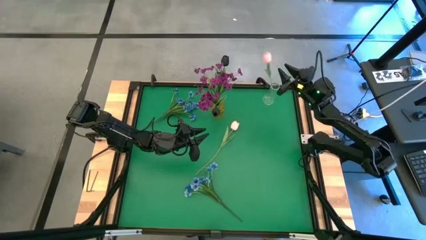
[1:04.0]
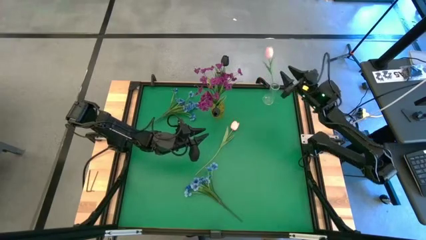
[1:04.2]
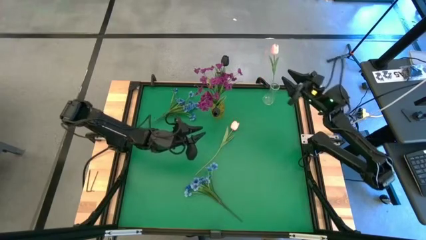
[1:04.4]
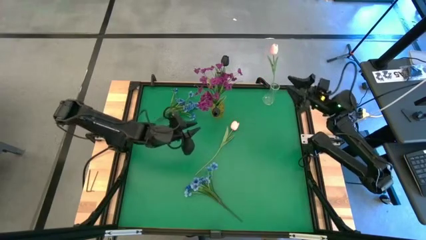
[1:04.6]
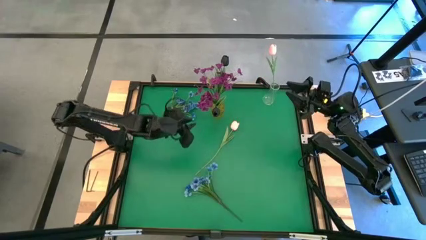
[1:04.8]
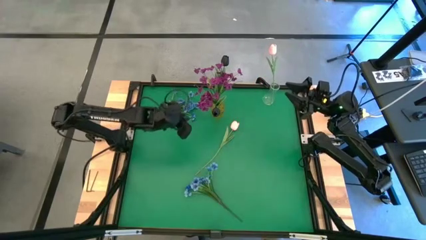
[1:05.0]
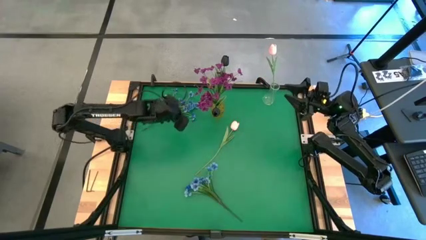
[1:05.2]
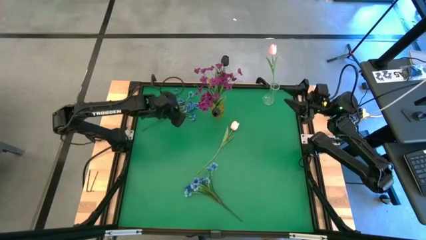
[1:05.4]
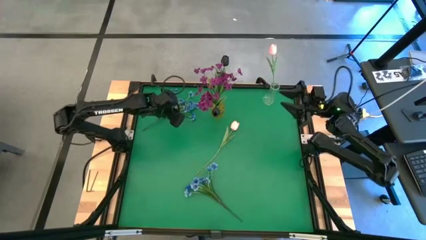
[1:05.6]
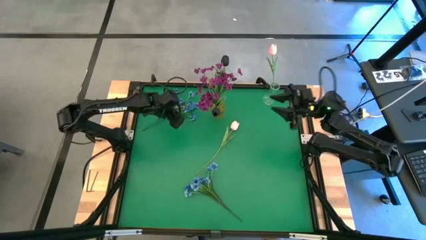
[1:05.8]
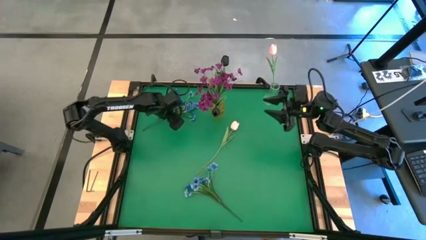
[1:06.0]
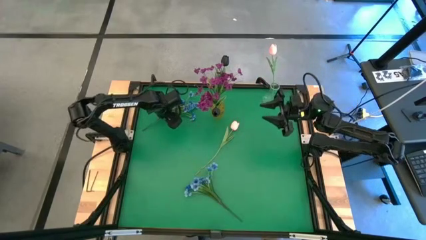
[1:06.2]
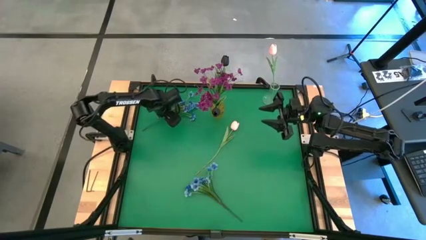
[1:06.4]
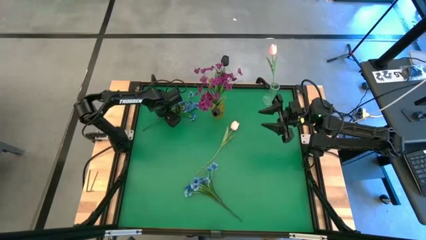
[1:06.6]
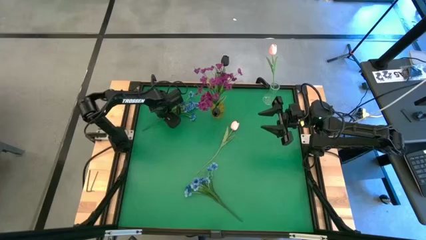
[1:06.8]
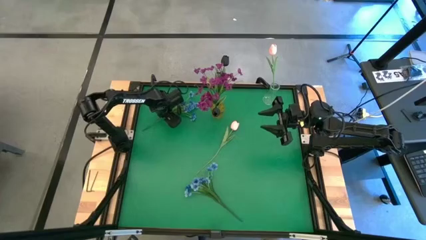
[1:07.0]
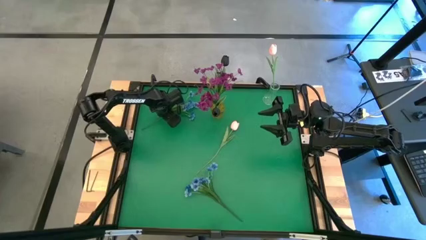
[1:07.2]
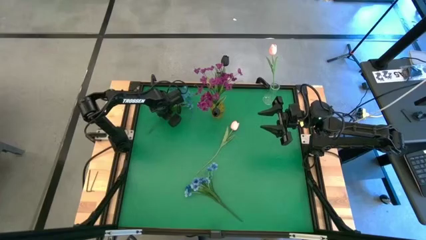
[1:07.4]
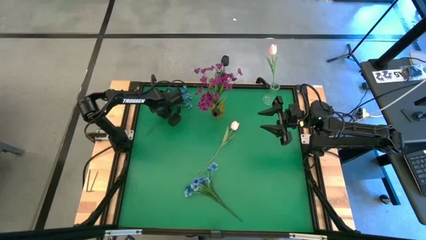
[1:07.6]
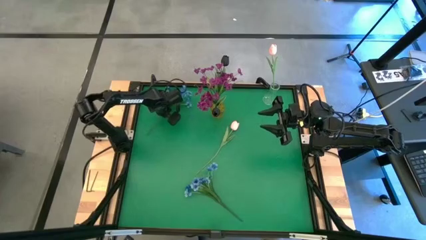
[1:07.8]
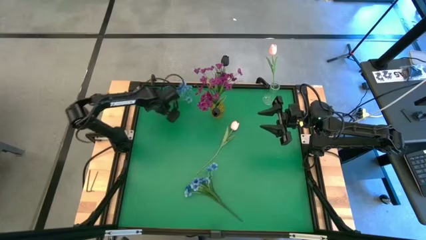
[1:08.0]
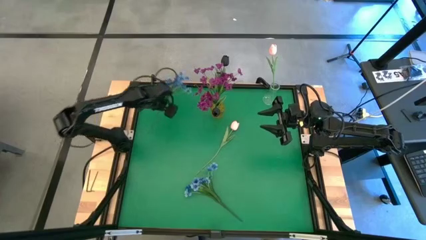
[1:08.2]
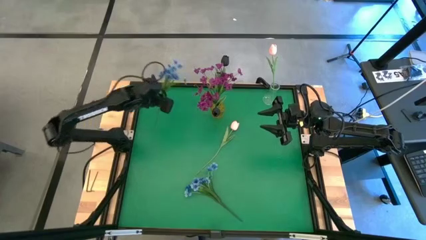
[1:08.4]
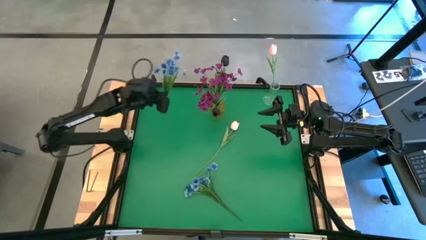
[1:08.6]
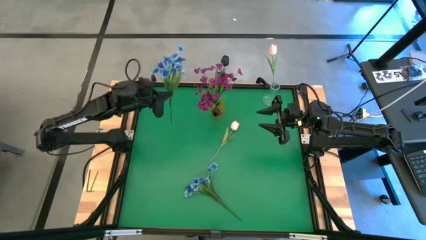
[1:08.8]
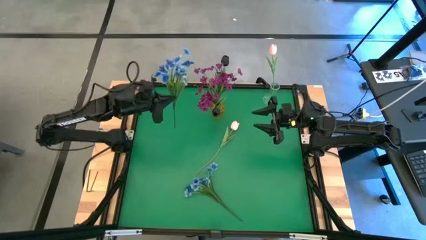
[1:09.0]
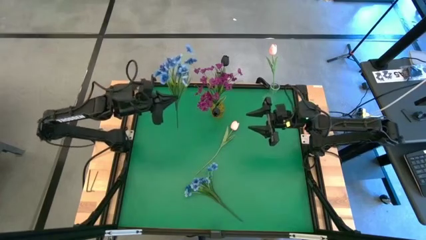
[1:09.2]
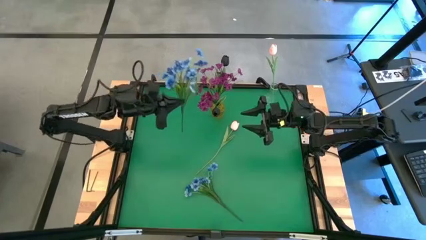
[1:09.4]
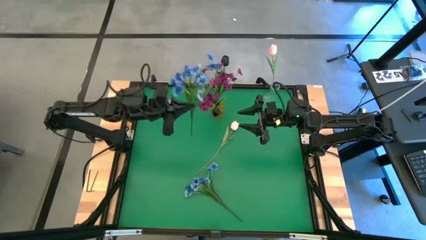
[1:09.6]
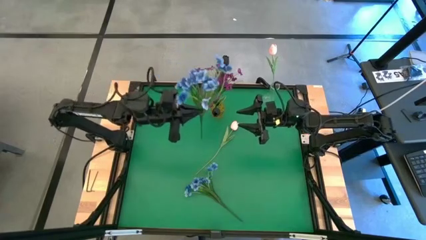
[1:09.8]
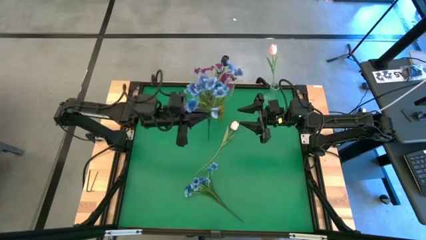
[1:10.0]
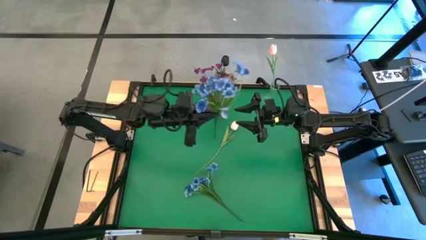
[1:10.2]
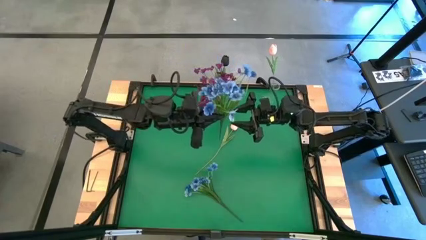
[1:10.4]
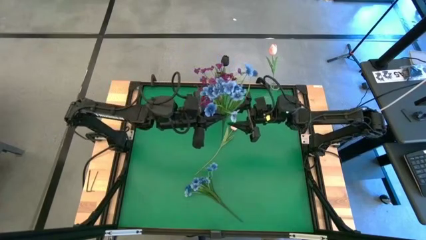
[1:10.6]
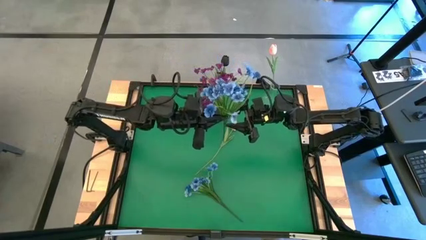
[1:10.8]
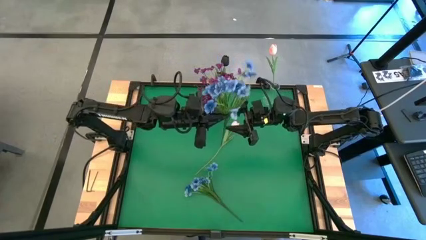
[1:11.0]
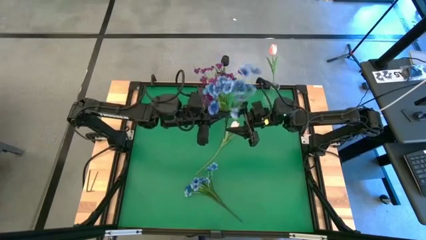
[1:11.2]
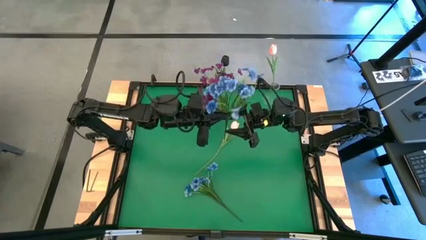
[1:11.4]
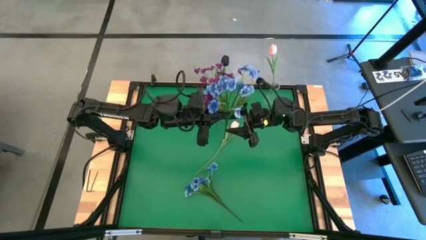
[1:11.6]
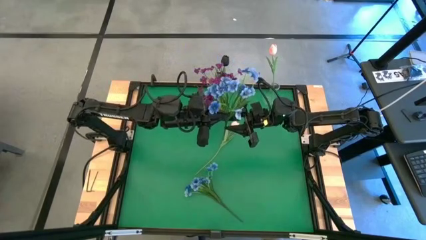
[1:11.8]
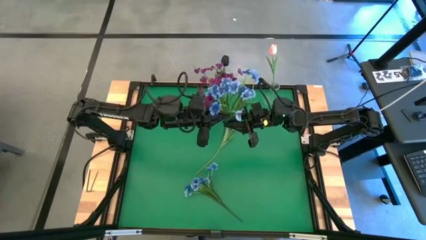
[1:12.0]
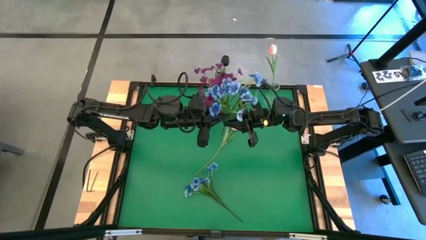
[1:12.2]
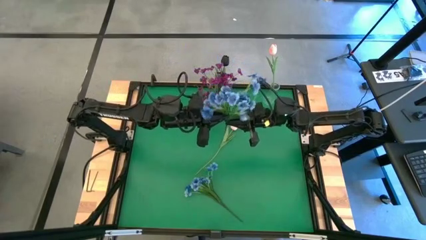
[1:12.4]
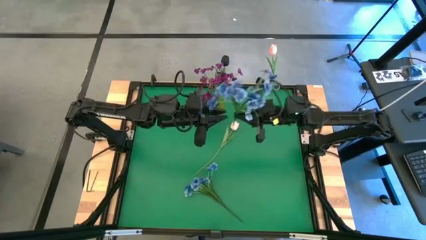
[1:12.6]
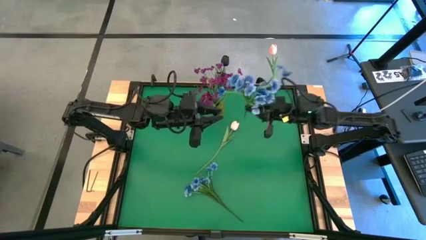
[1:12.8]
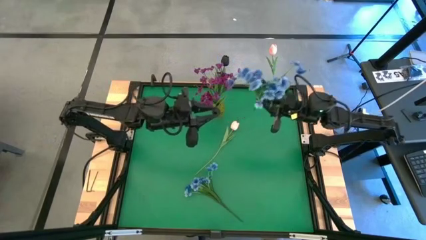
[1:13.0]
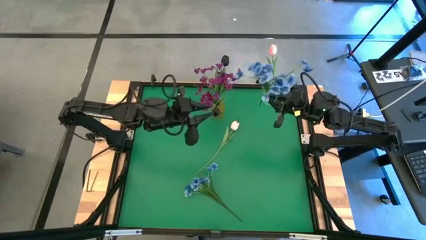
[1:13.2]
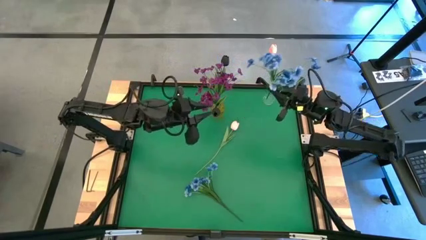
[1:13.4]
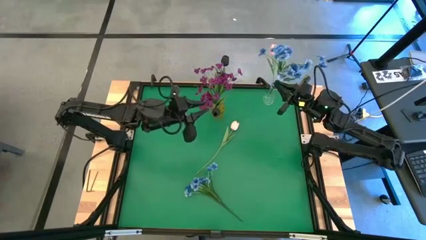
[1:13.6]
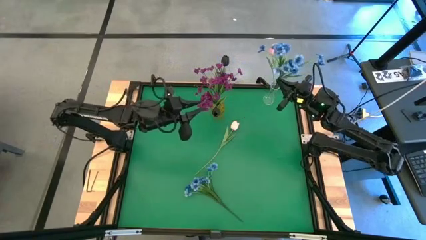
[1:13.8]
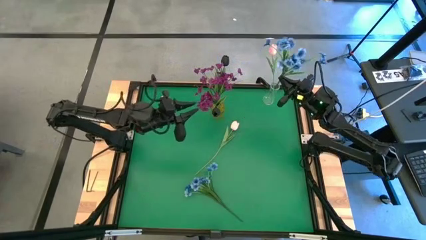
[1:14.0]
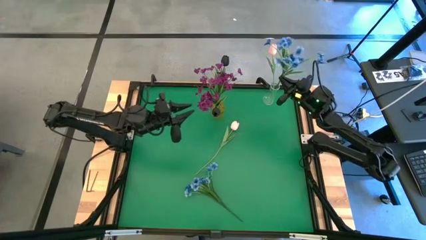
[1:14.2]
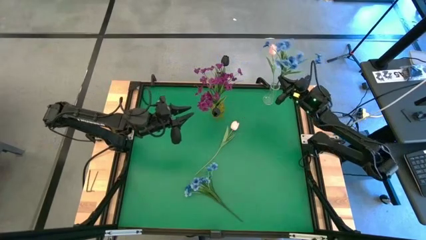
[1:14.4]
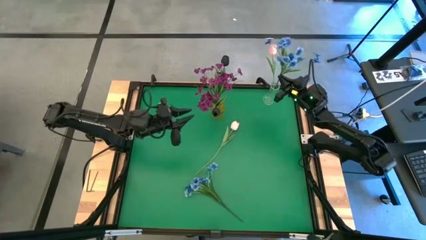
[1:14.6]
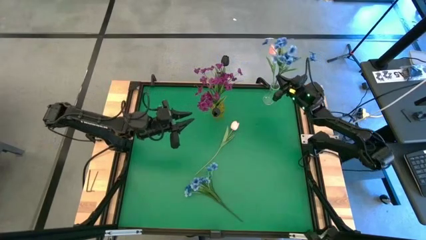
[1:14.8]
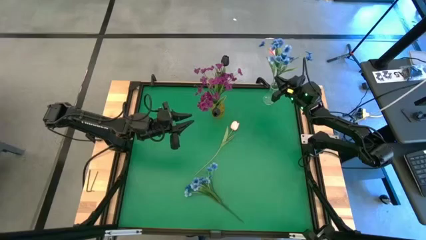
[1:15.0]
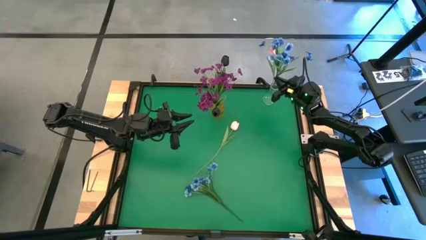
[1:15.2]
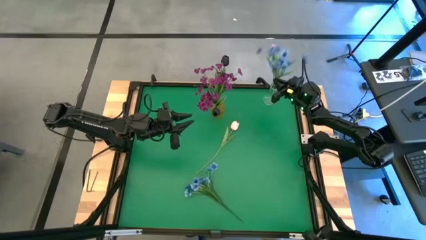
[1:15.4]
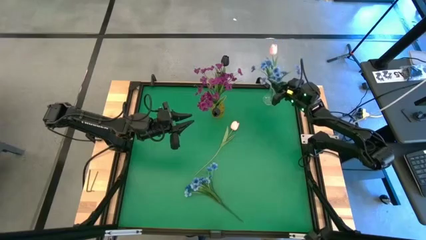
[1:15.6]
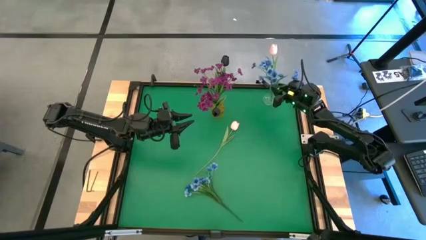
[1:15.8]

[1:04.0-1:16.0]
Task: Sort flowers into vase by color
Put the top blue flowers into the transparent vase

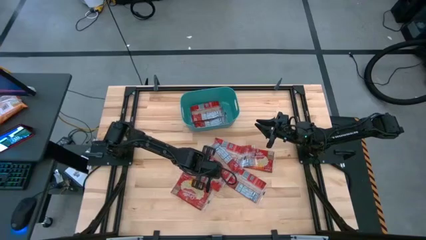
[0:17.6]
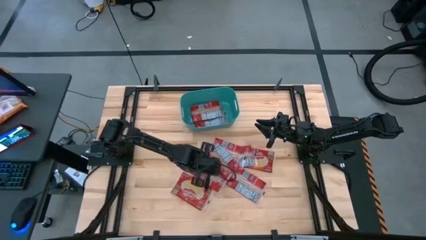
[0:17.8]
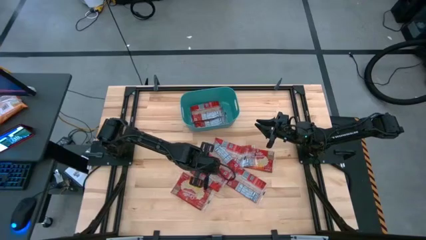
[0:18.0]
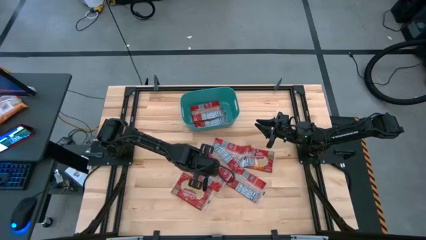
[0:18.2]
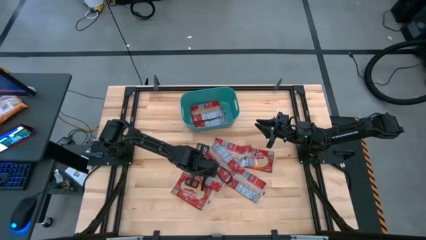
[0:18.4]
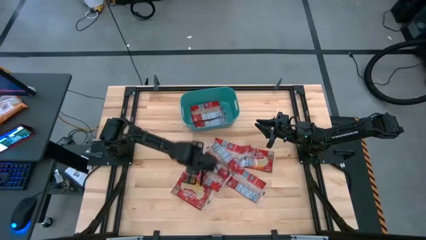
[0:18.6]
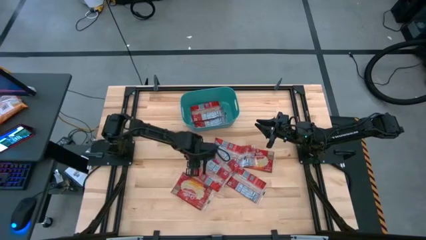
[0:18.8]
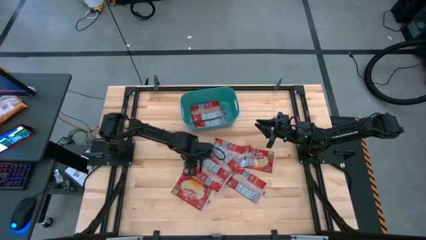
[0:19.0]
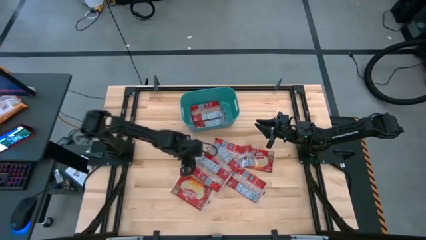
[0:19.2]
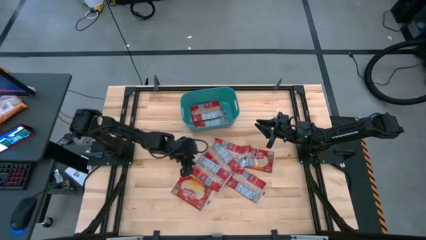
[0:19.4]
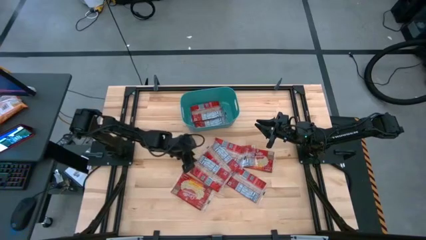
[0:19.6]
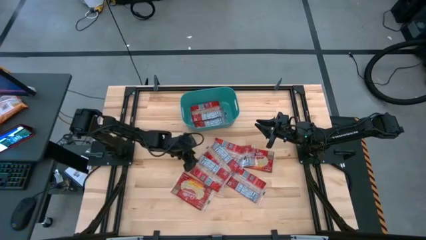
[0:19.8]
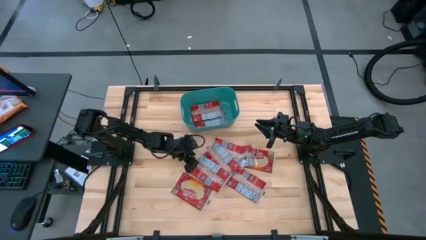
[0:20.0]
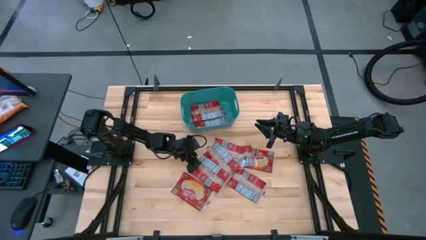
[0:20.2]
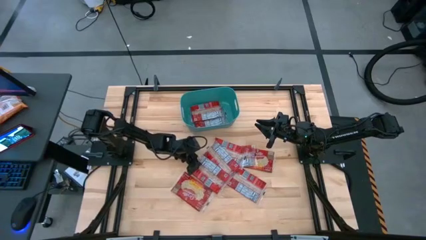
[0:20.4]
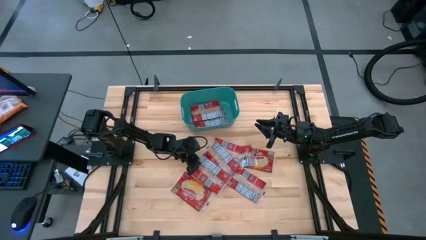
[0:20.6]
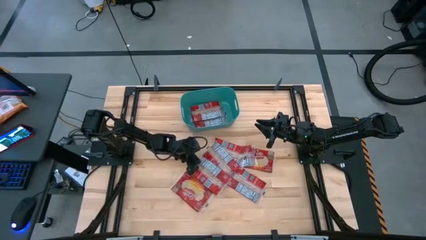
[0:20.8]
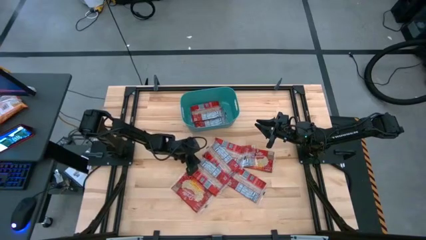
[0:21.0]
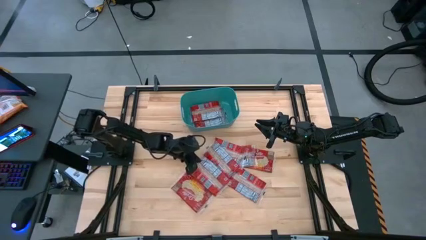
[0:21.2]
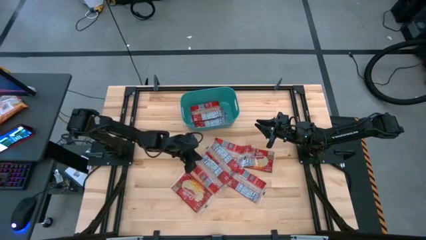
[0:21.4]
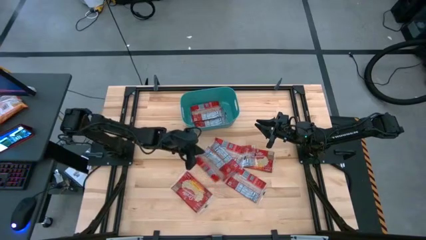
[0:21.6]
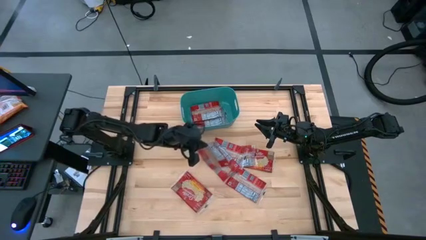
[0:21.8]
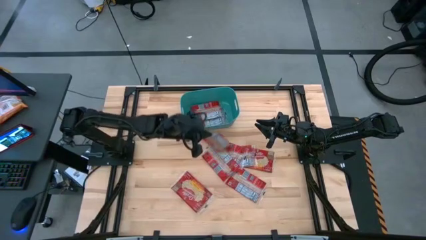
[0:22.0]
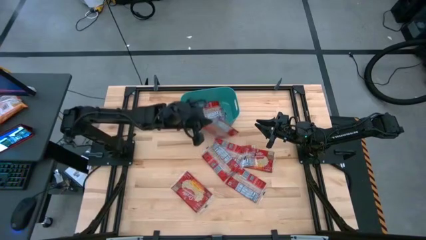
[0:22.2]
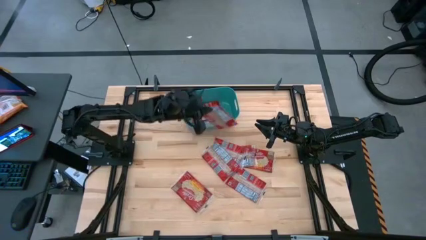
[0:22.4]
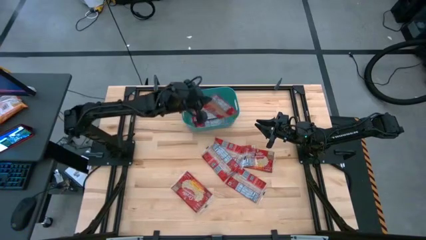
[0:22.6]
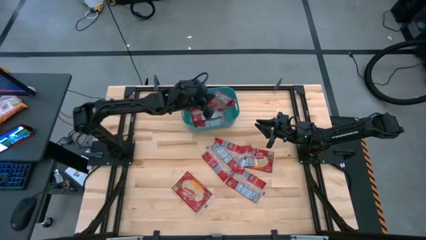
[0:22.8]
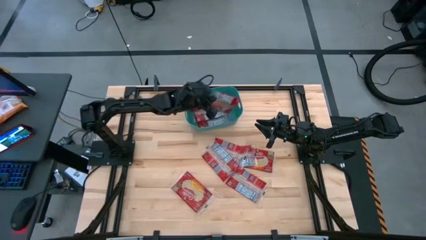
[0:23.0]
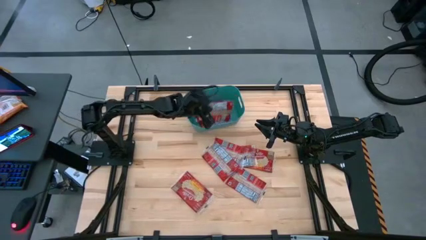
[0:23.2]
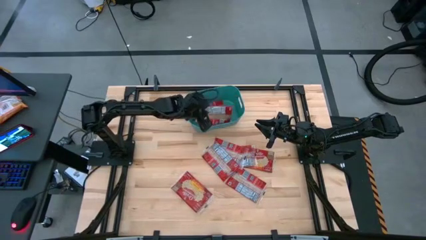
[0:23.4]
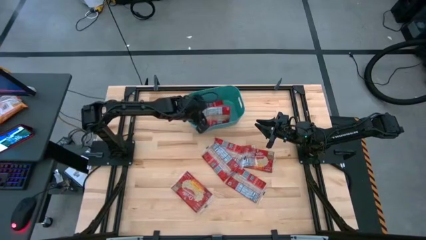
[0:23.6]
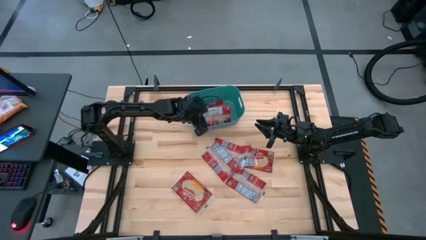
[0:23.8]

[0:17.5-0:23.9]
Task: Sort popcorn bags into baskets
Put the red popcorn bag into the blue bin
